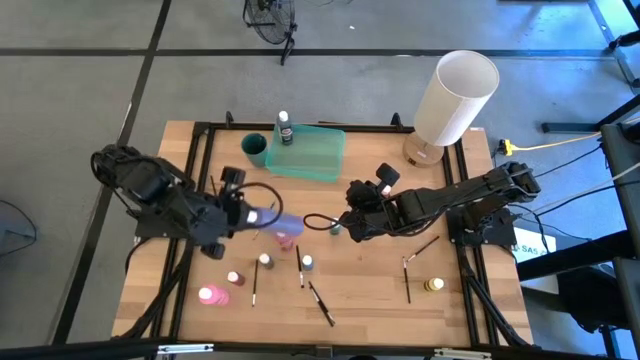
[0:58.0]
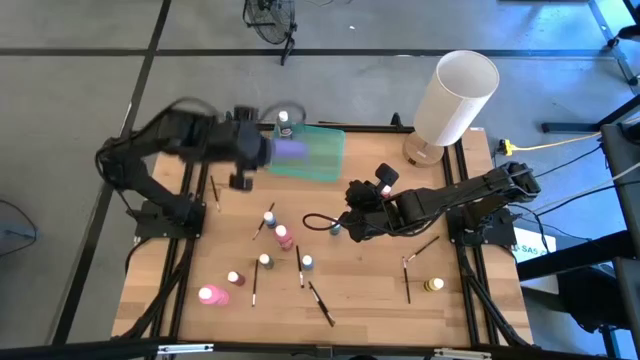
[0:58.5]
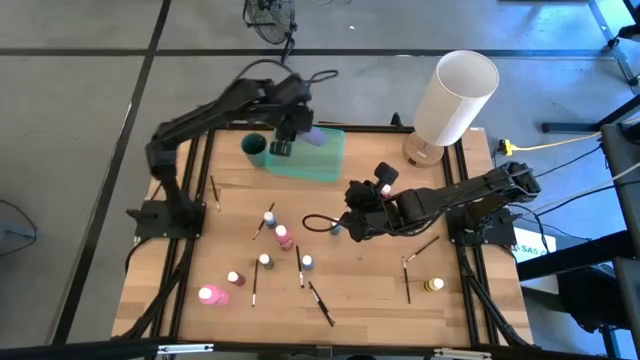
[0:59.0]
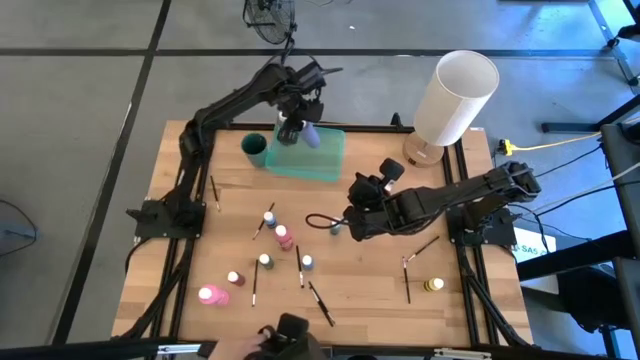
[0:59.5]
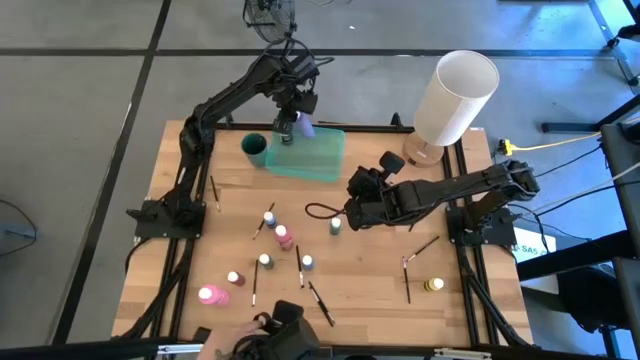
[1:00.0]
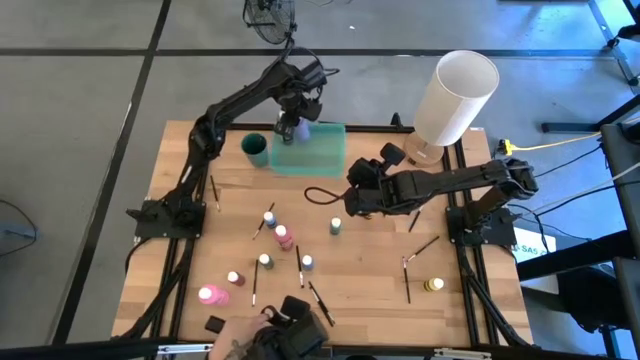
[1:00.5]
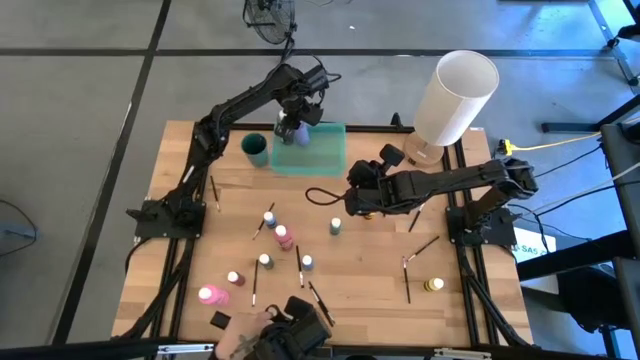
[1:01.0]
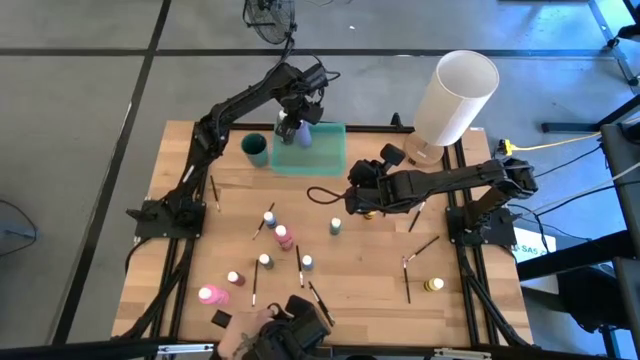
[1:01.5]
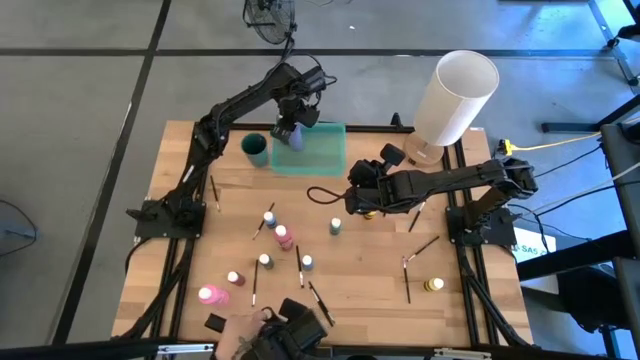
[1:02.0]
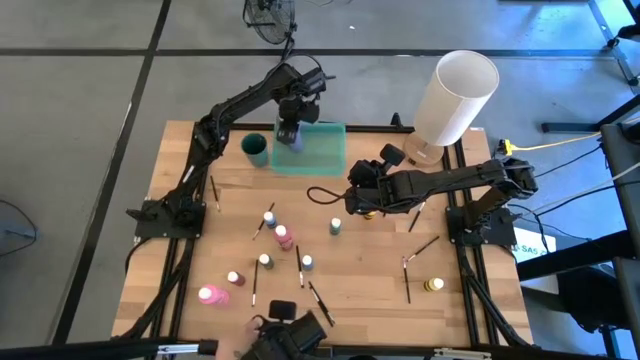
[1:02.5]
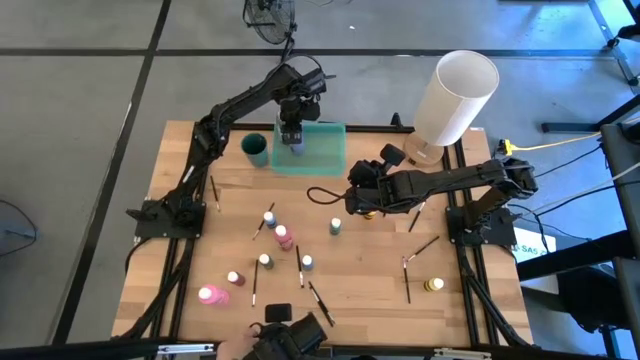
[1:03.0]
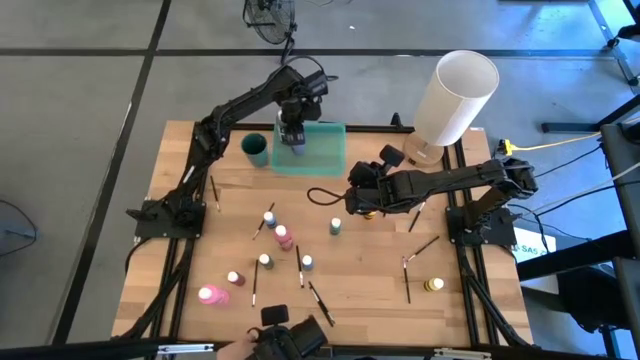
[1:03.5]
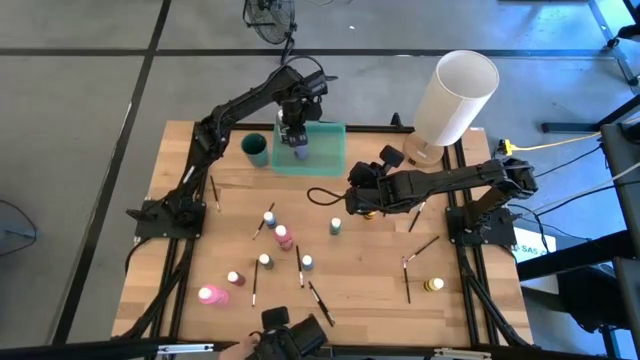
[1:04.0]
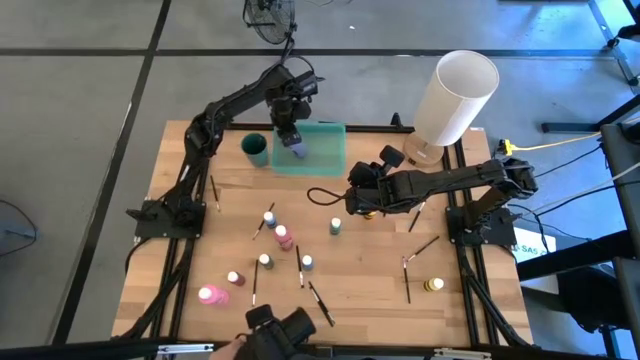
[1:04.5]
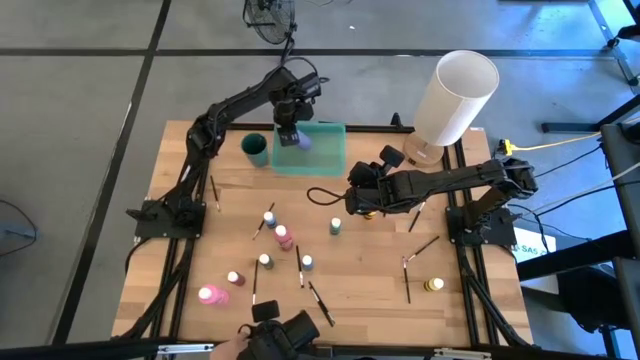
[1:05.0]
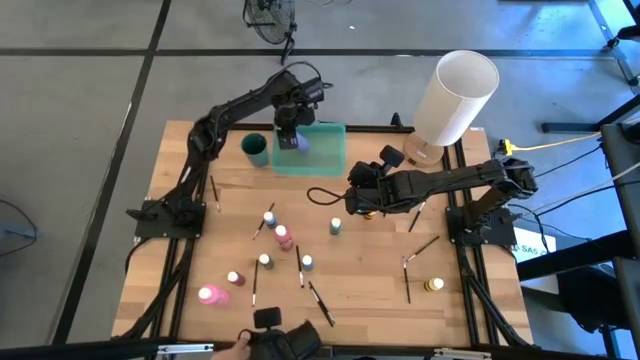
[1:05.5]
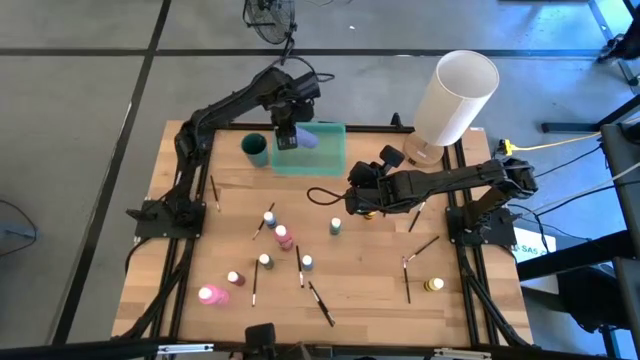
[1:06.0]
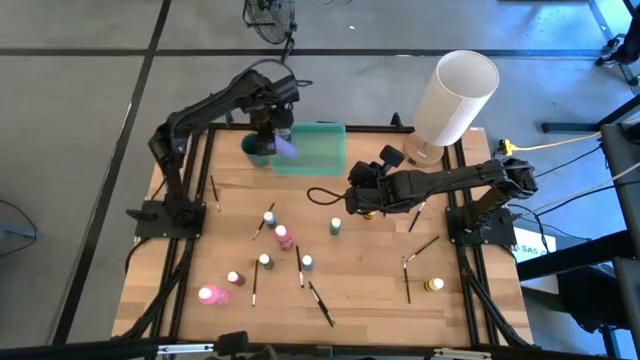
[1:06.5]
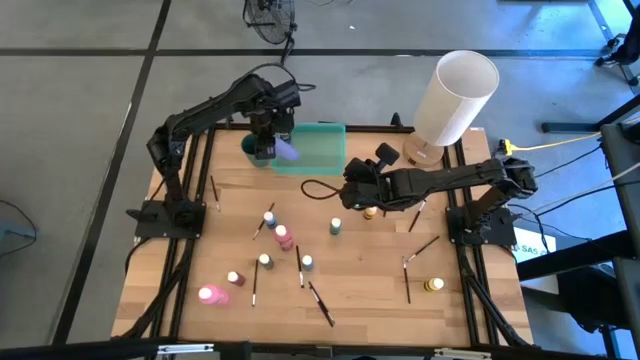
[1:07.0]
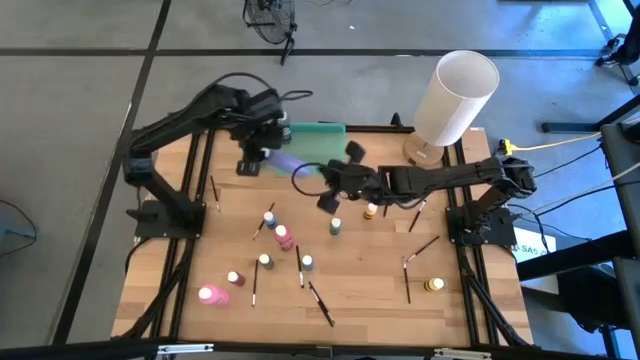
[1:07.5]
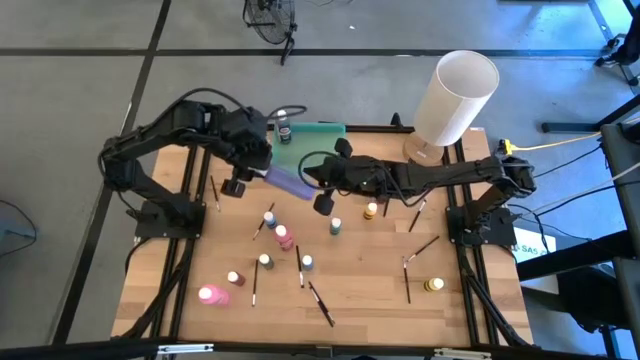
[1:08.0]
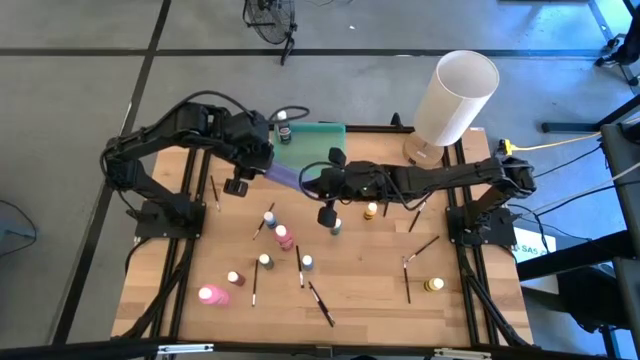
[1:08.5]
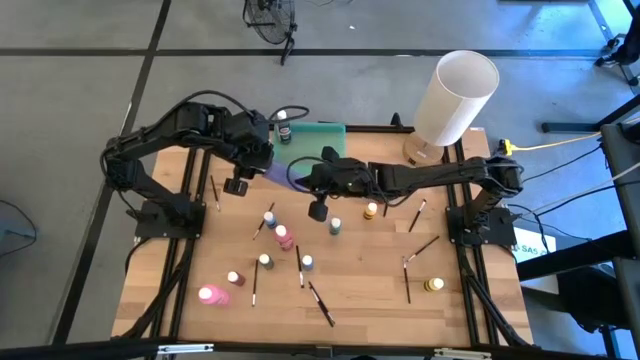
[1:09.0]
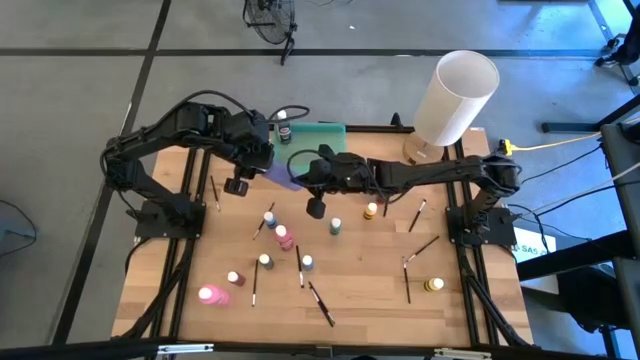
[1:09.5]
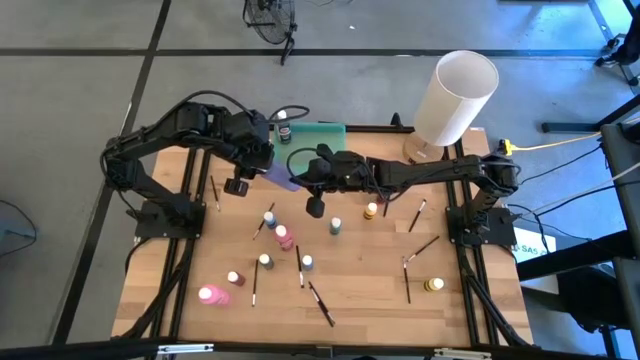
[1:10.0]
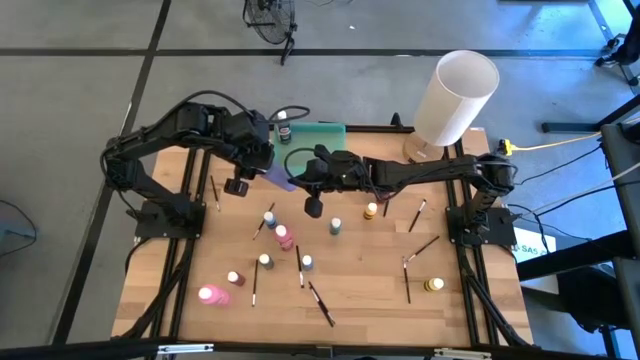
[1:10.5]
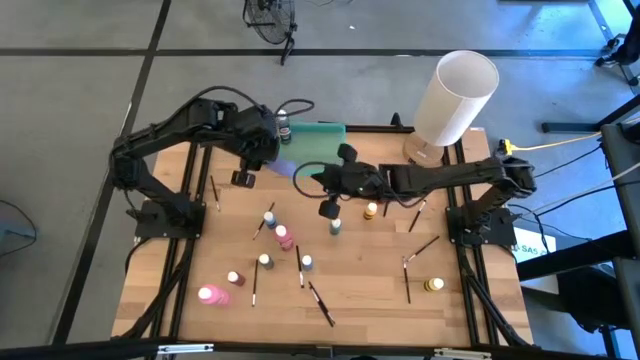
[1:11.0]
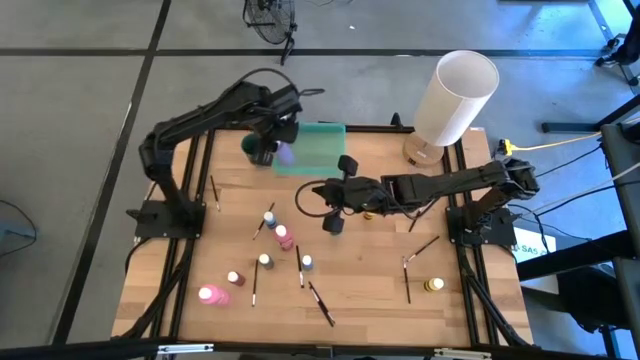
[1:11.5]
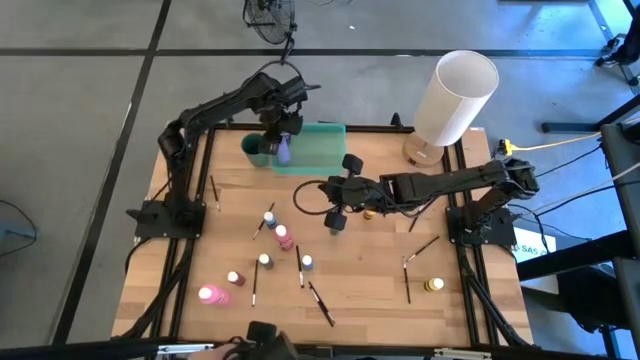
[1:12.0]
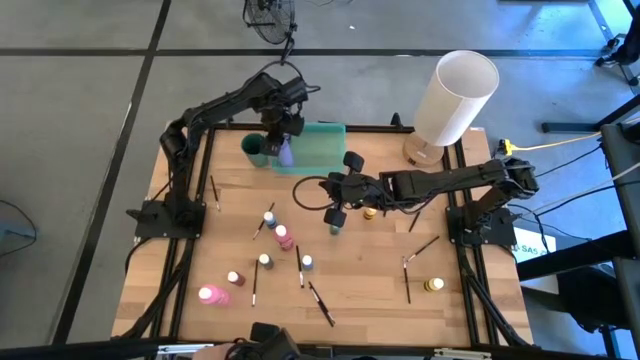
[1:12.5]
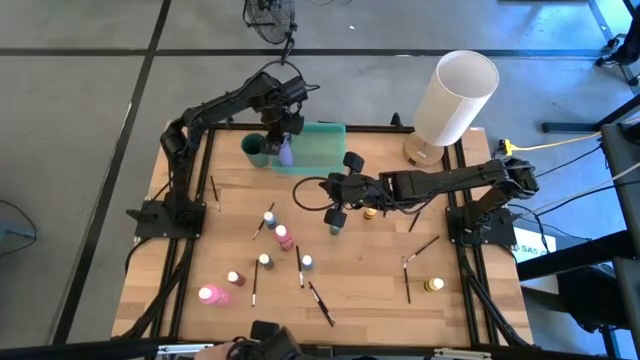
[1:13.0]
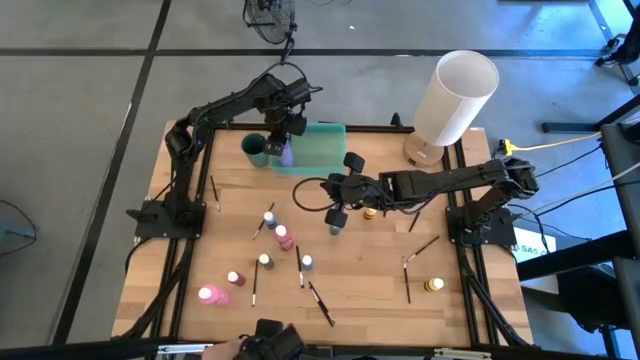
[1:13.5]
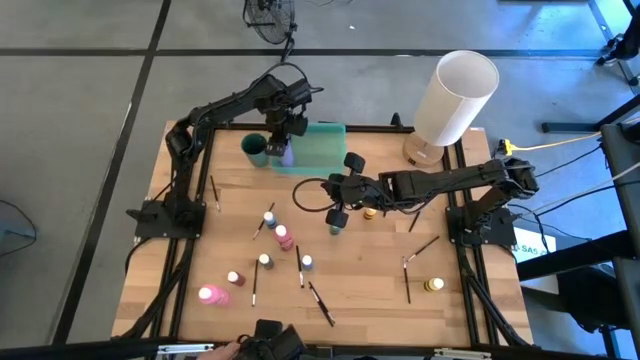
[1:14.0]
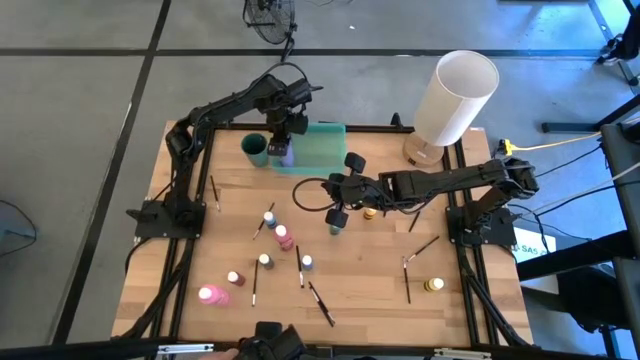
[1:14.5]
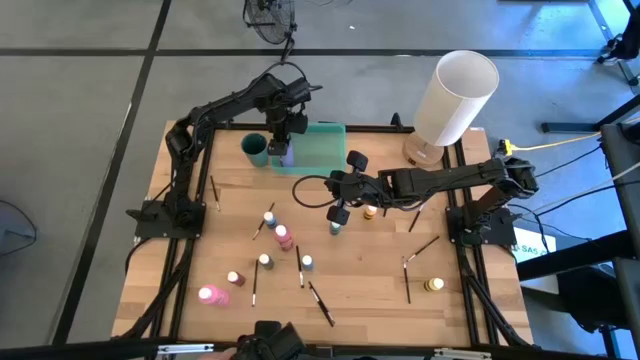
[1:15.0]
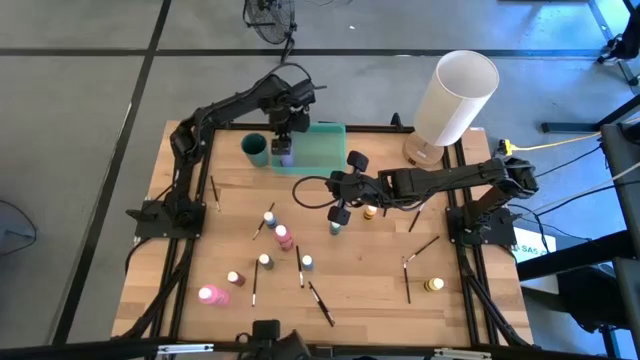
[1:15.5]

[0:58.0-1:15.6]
Task: Pick & Place Paint Supplies
Put the big violet paint bottle into the green bin

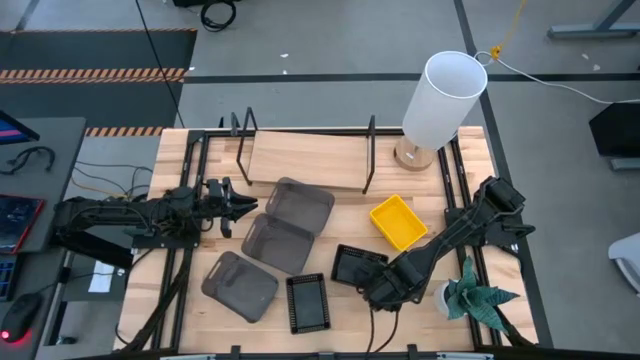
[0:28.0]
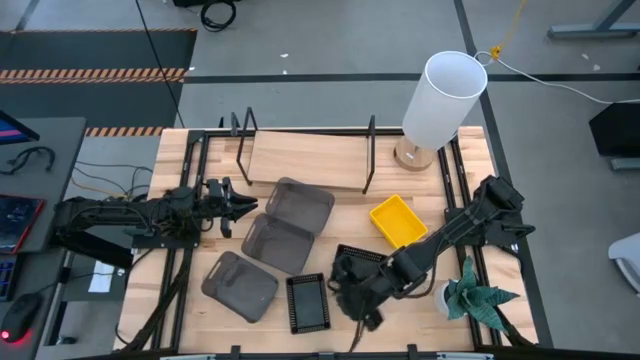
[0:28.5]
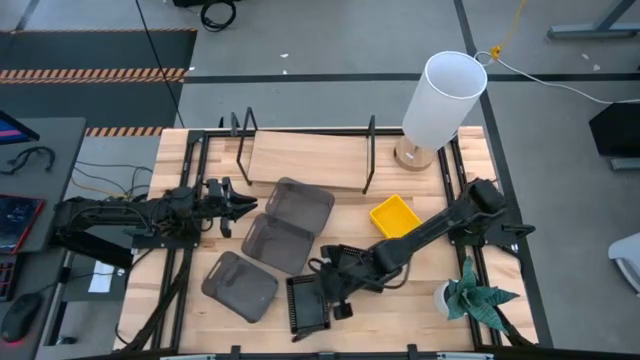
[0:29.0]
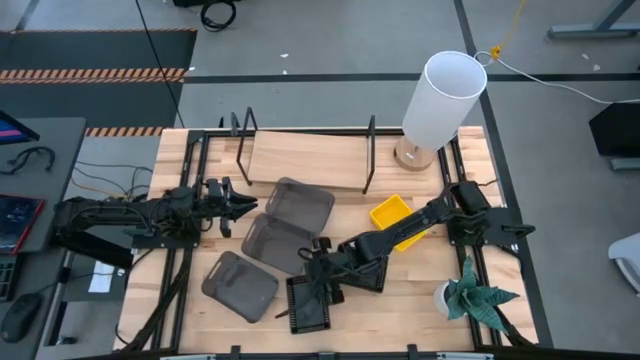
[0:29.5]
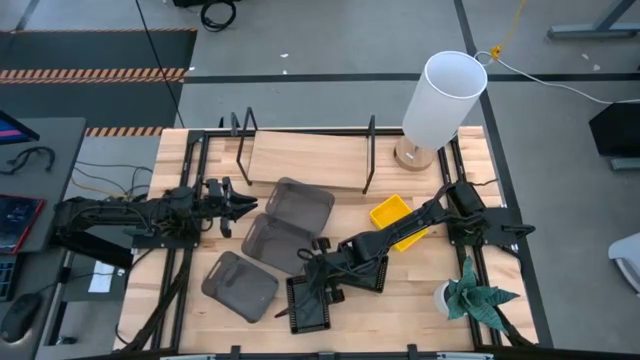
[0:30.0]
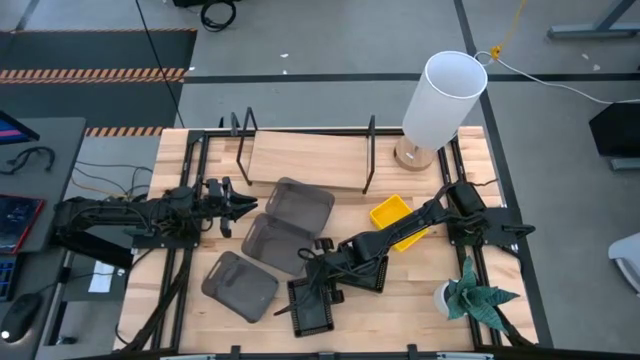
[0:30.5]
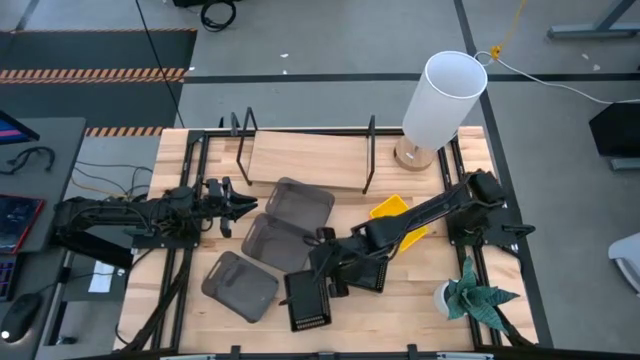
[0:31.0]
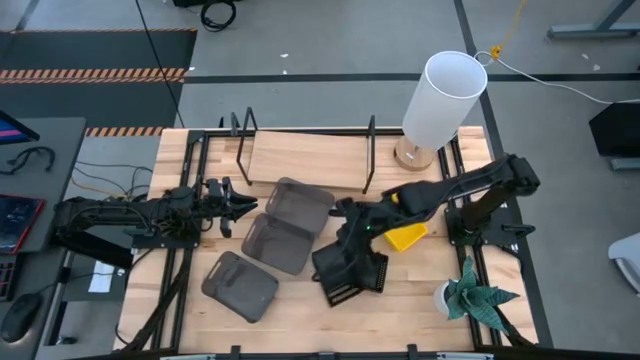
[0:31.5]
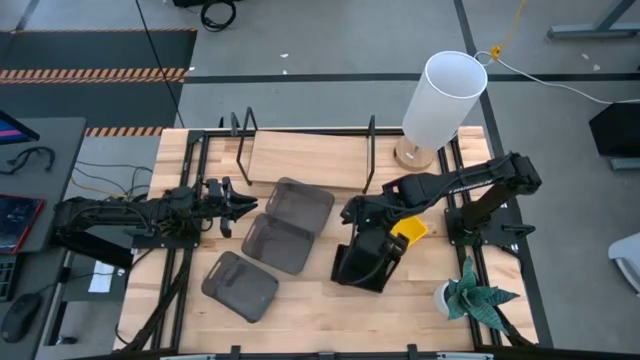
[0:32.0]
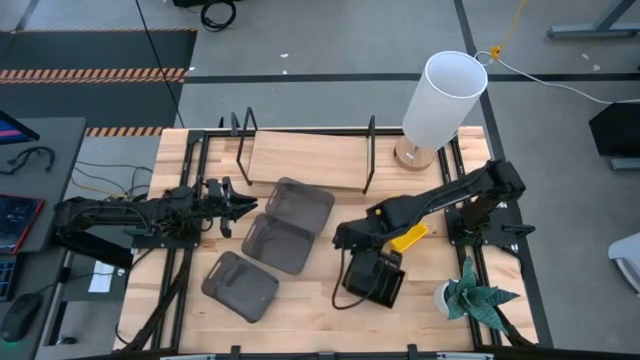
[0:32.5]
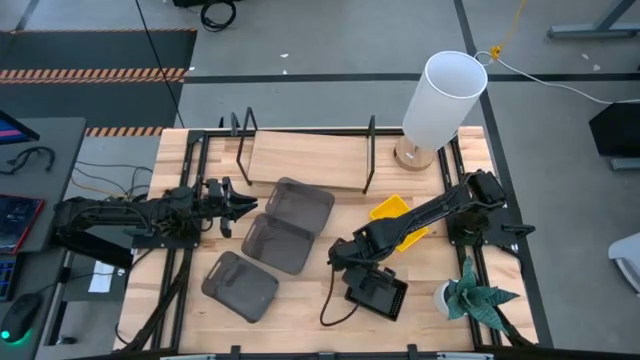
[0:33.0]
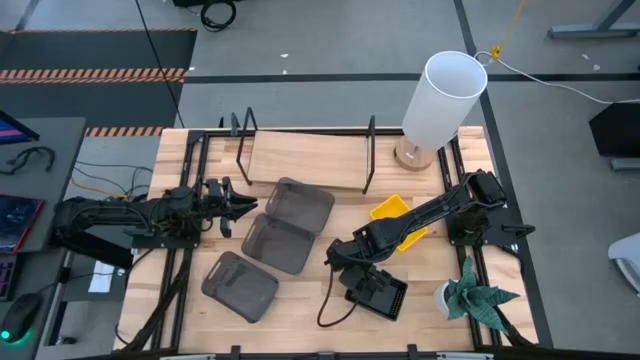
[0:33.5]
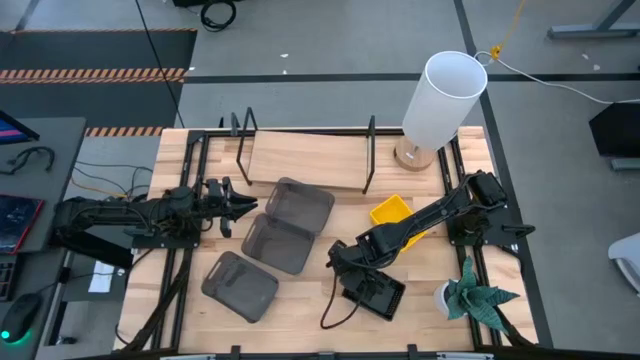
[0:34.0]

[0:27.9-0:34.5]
Task: Stack baskets on shelf by color
Stack the bottom black basket on the top black baskets
